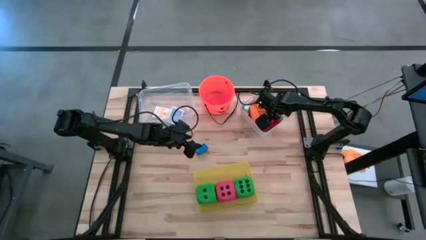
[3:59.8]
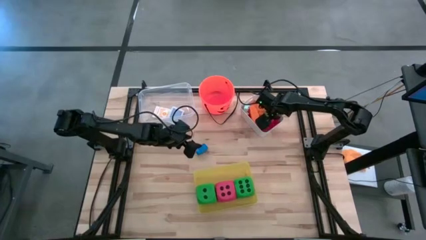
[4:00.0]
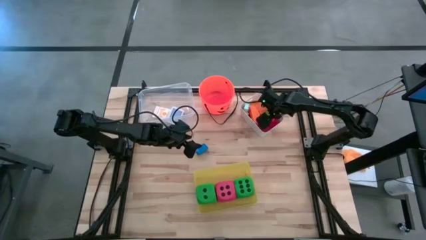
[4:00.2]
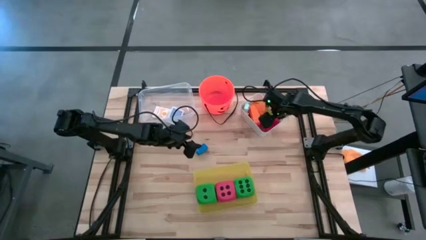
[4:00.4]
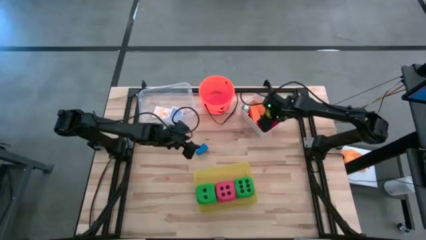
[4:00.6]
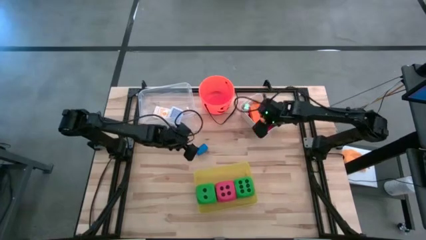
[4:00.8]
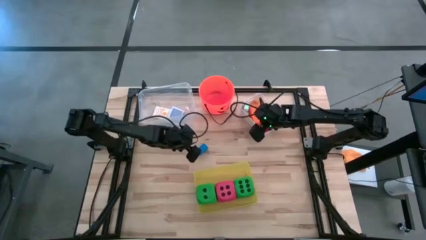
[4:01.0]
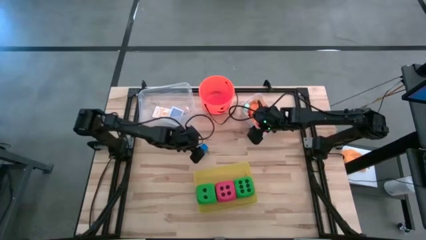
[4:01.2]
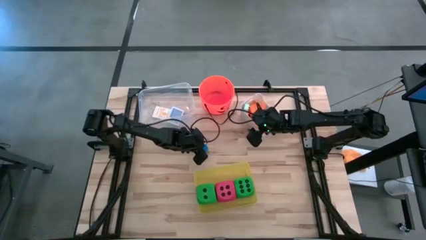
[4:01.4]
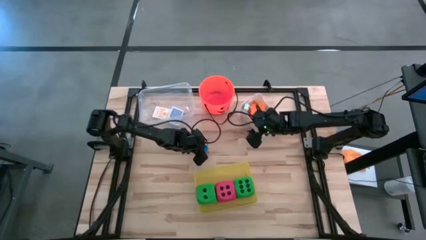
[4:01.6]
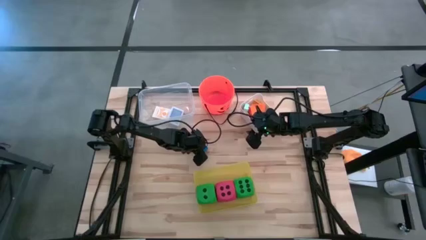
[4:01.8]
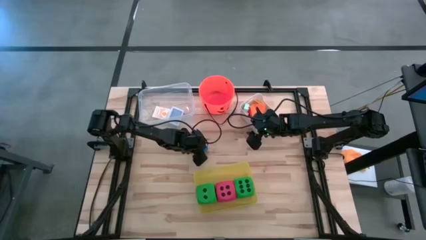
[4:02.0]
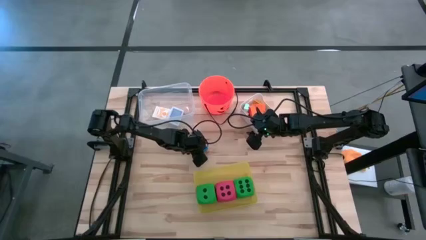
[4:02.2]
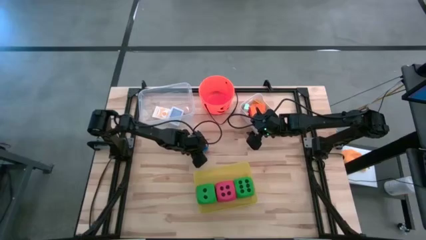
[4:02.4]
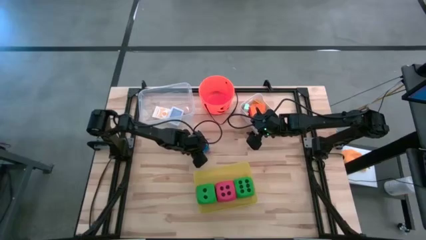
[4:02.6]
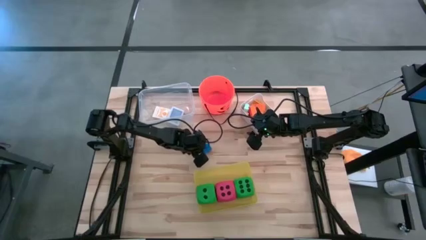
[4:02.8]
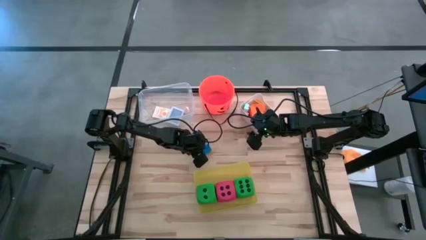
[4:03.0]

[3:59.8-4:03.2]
Task: Pick & Place Toys
Put the blue game piece into the white bin

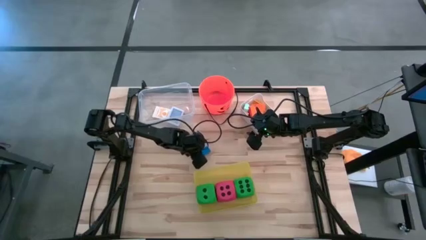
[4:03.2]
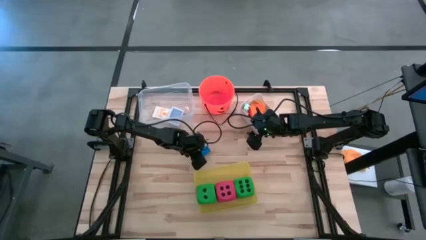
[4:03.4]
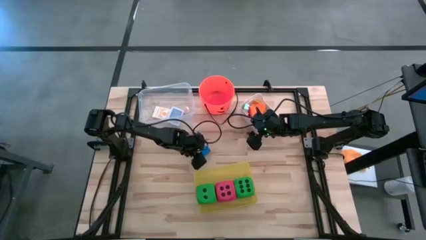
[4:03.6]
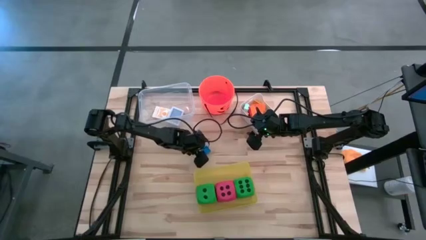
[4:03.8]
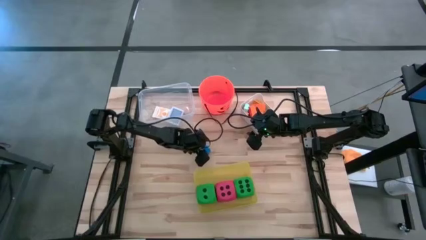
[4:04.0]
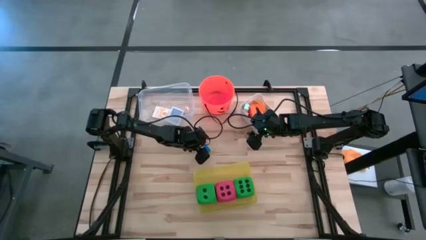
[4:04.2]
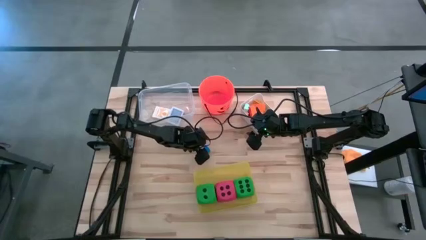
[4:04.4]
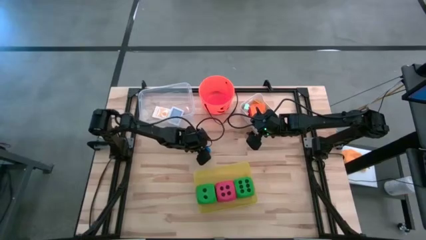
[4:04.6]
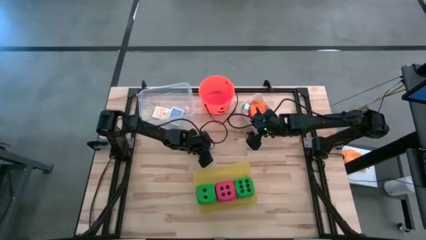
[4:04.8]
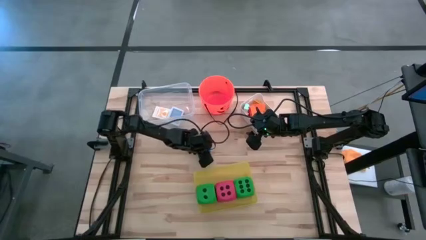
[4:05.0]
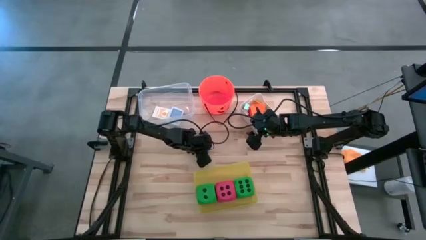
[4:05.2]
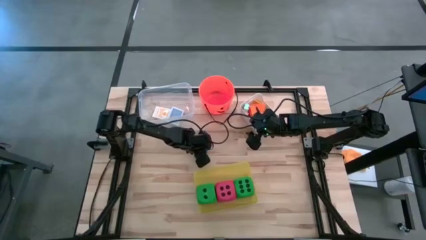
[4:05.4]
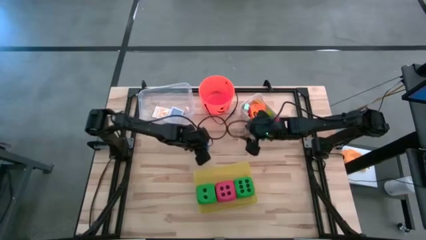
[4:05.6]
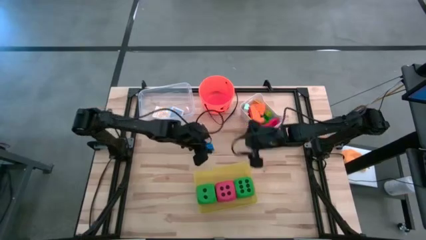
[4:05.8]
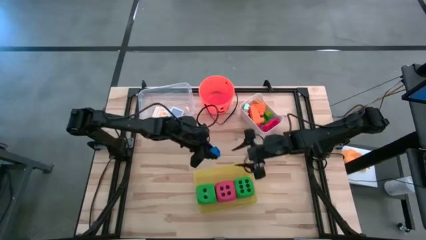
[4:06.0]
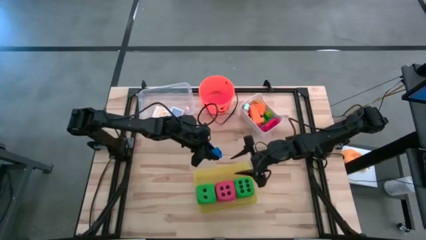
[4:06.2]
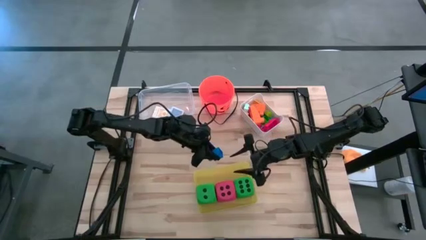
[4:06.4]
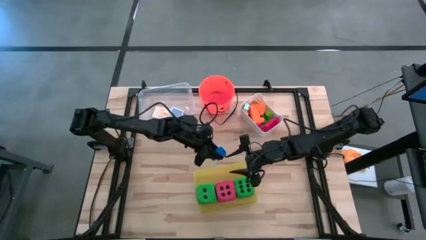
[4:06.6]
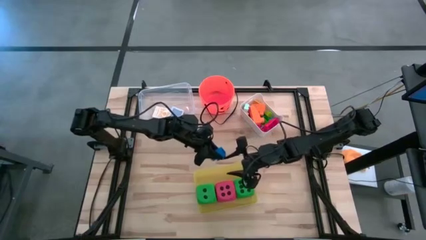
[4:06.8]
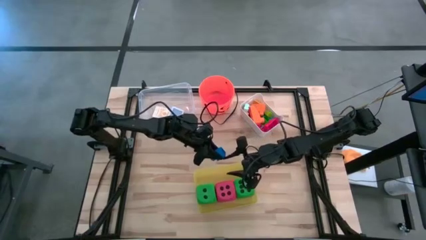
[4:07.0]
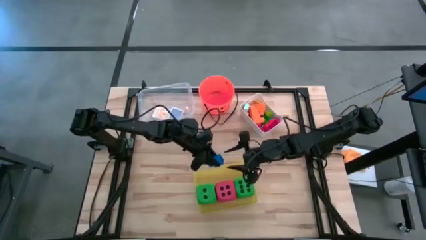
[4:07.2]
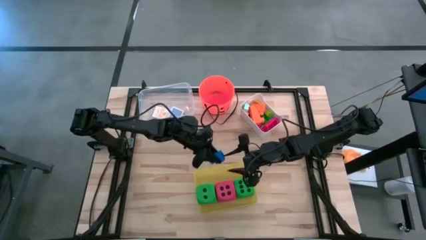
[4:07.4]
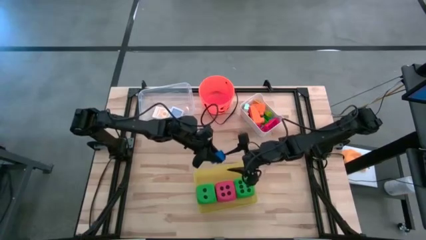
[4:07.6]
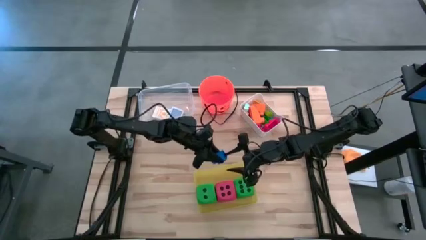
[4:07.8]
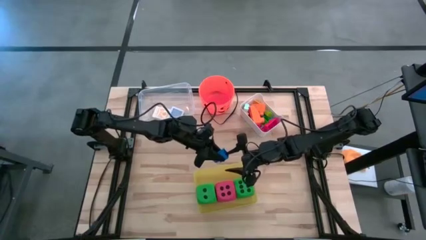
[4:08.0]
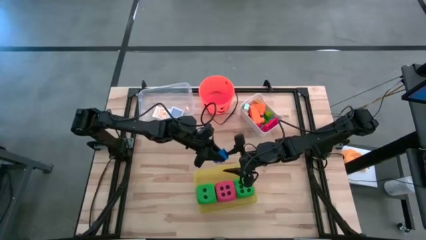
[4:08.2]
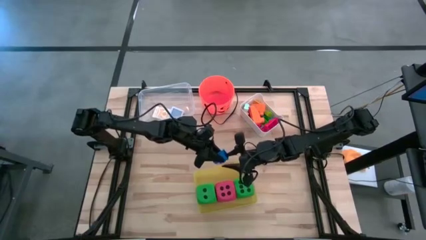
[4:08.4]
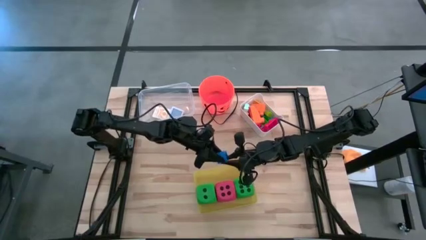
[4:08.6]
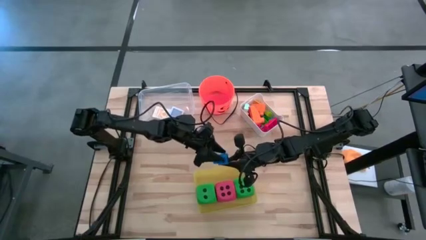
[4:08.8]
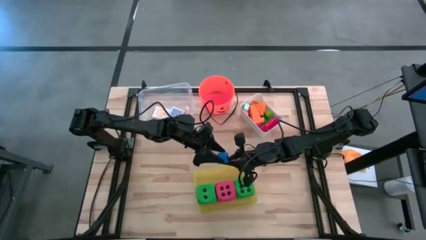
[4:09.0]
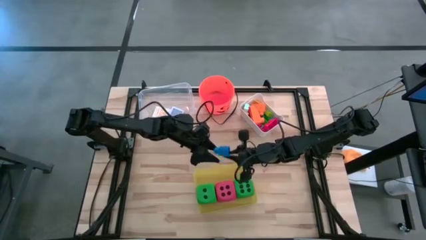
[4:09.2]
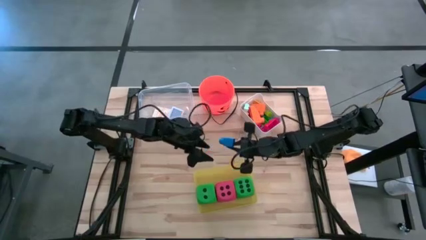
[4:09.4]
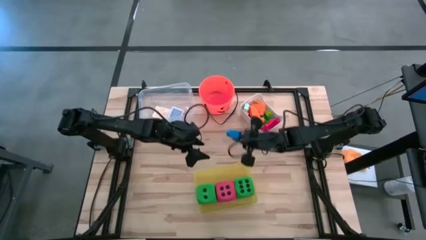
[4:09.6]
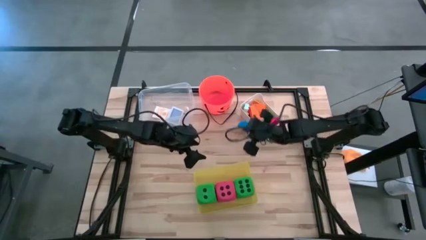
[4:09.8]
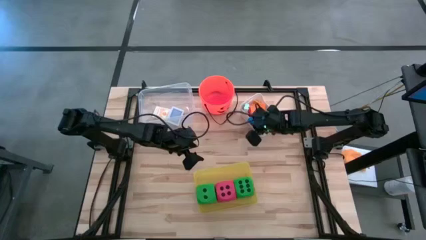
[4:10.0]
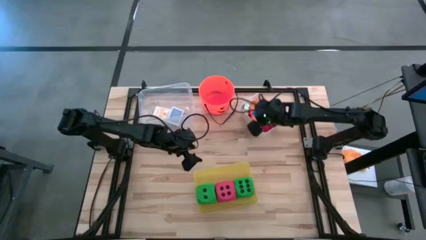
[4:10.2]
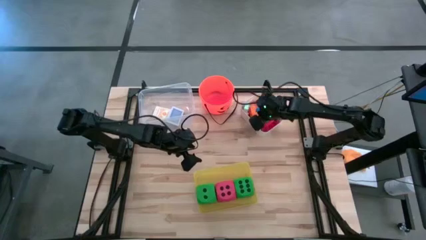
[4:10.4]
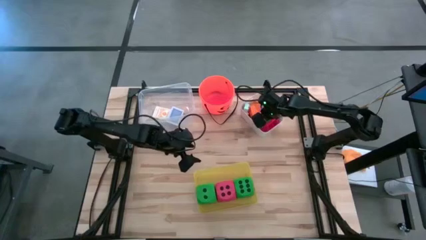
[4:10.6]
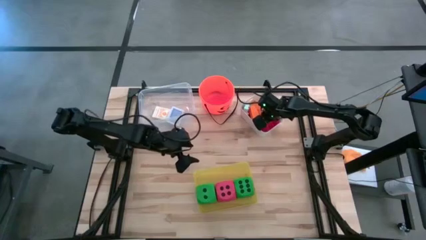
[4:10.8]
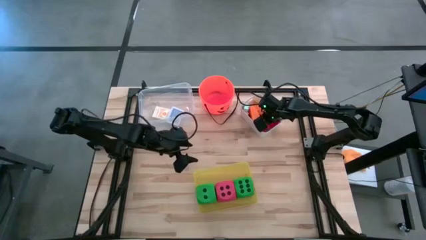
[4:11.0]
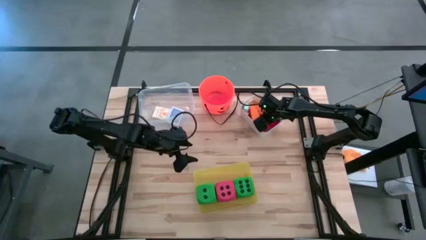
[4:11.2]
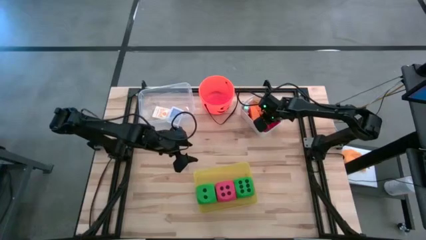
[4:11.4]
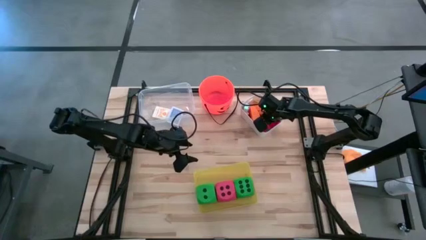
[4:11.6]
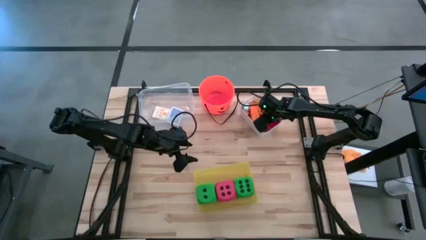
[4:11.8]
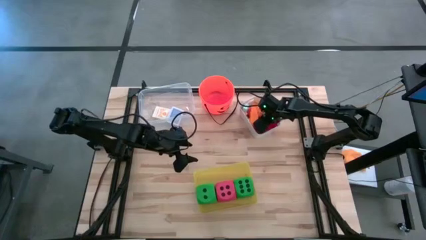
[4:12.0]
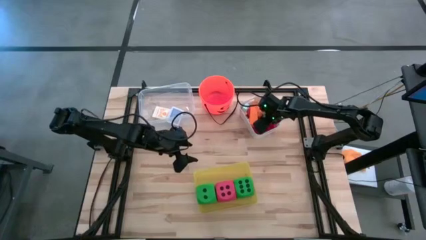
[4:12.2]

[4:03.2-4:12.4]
Put the blue game piece into the white bin

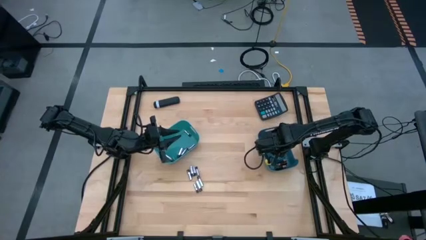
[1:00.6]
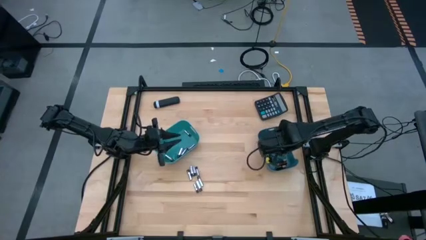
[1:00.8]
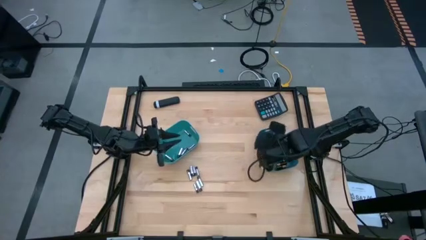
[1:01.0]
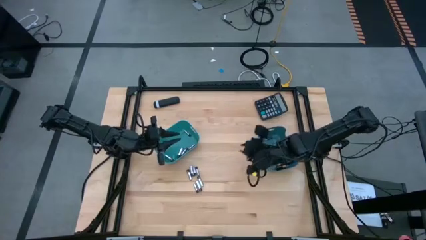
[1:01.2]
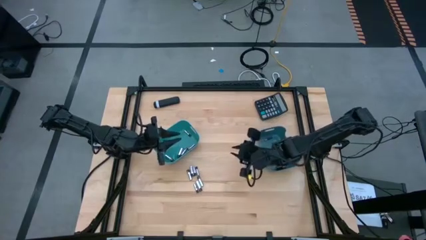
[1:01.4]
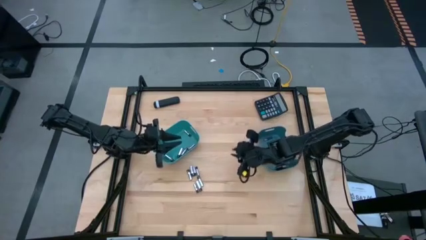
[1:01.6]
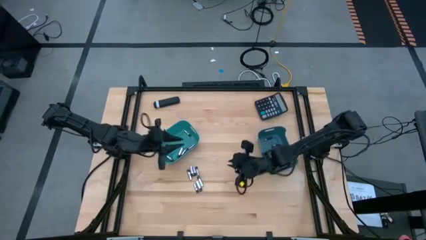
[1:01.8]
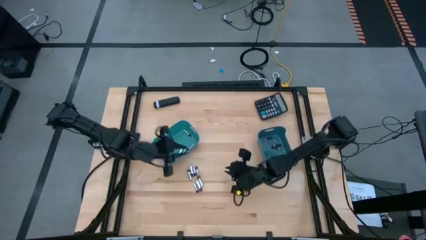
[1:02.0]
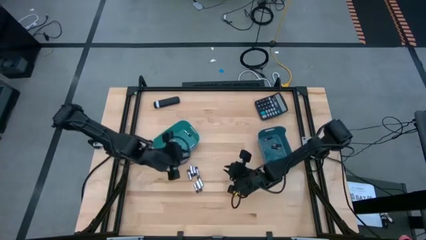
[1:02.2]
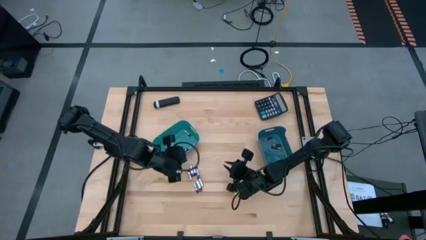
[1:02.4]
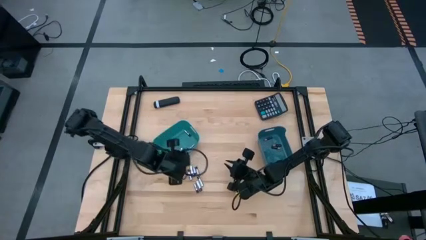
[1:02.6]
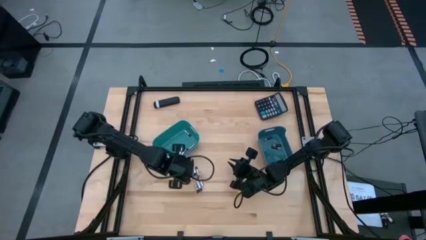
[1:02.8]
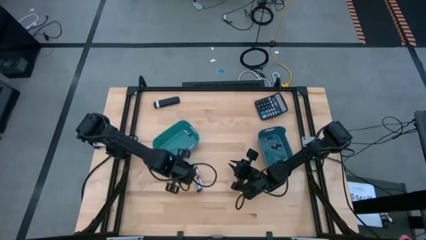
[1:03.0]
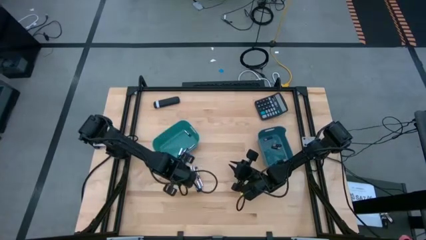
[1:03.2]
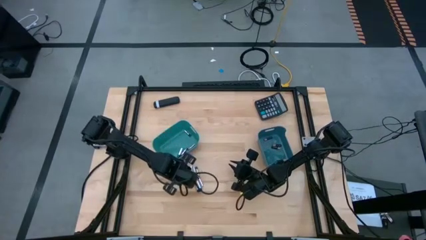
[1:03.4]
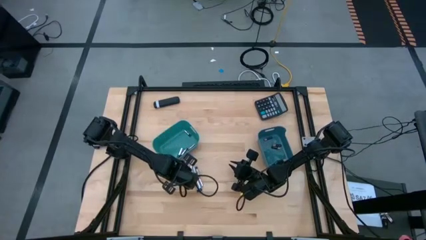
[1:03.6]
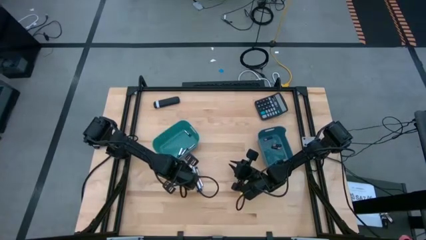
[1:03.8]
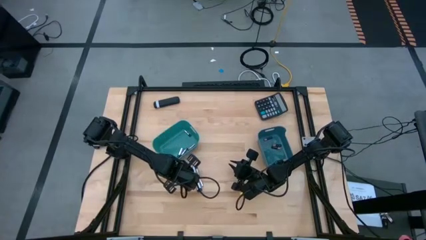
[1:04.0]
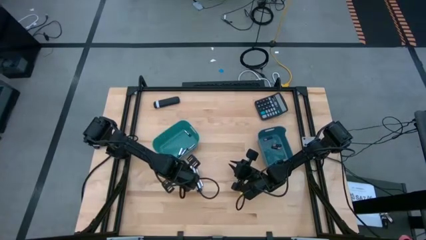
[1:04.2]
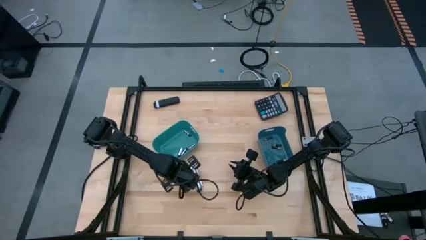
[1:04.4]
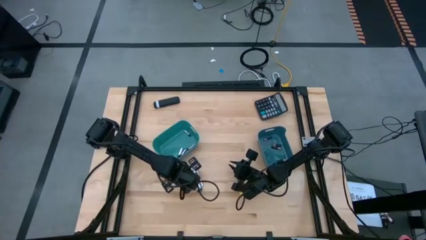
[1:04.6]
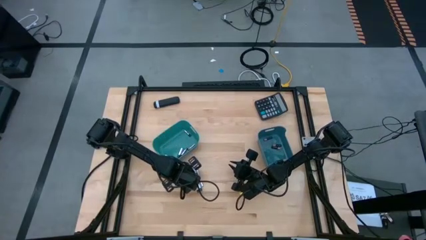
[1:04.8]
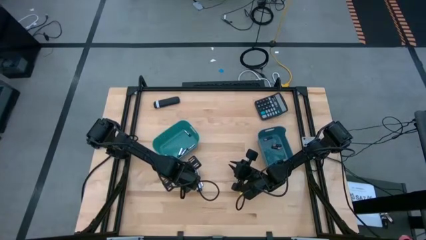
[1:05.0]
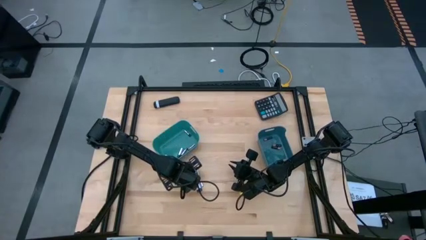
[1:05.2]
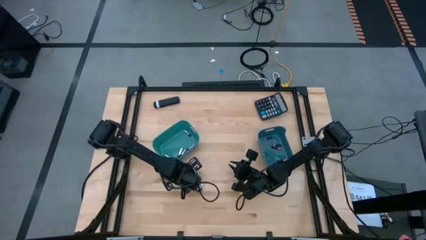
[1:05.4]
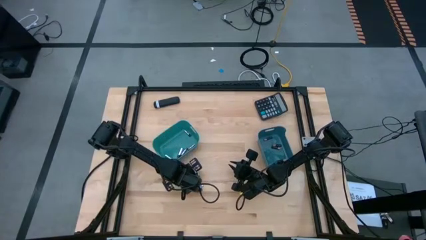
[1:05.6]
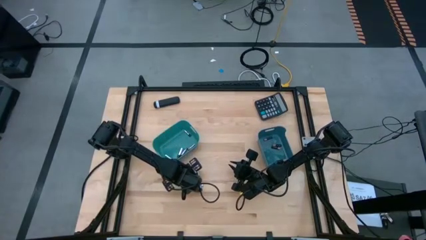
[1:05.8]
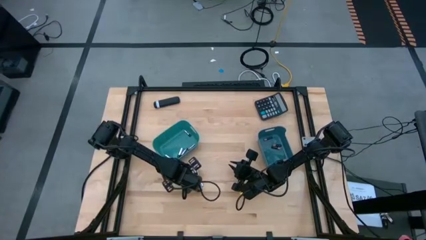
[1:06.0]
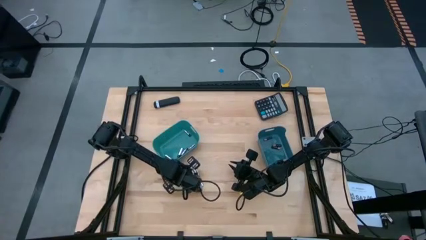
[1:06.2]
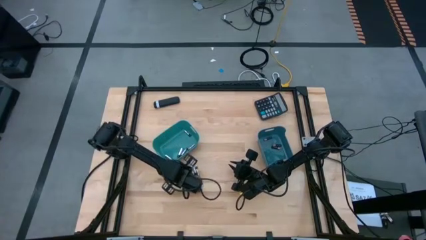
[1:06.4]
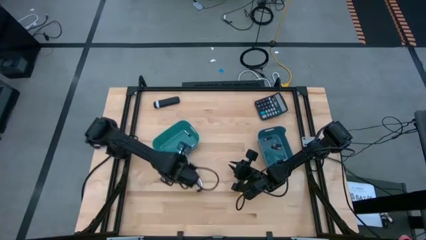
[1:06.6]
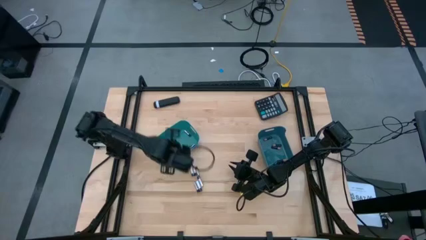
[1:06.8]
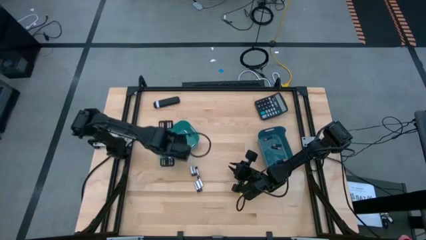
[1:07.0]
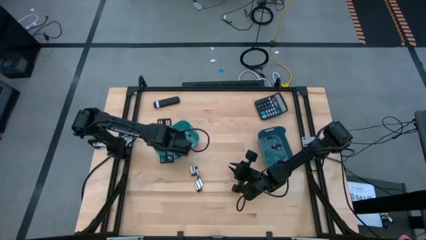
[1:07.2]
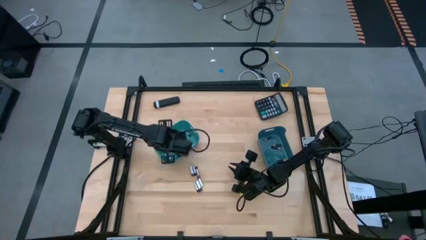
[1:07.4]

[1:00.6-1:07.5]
Task: Sort batteries
Put the white battery into the green bin
